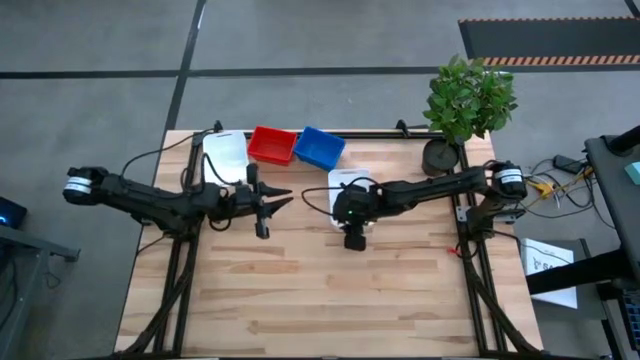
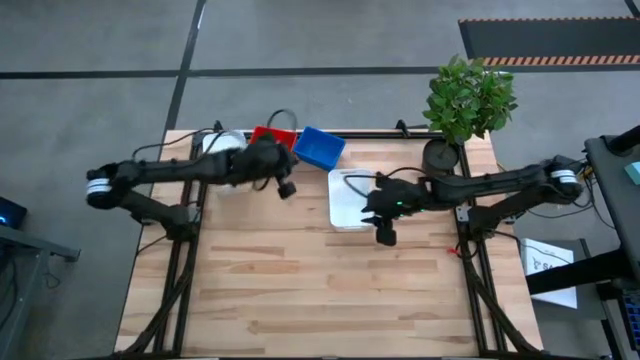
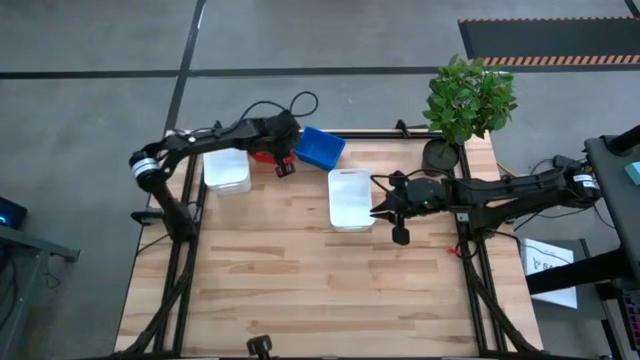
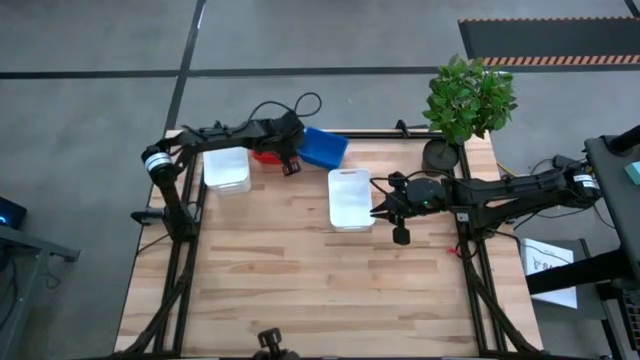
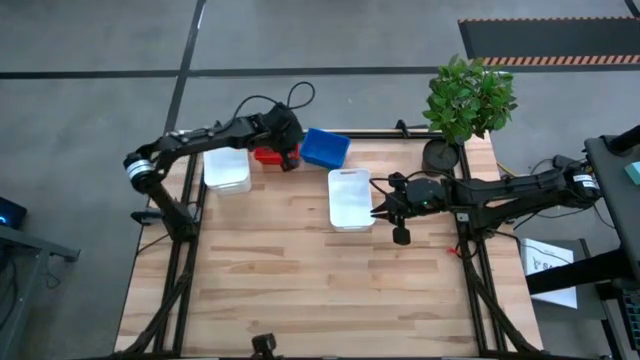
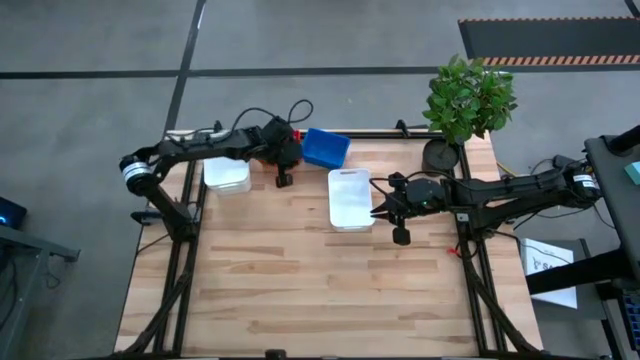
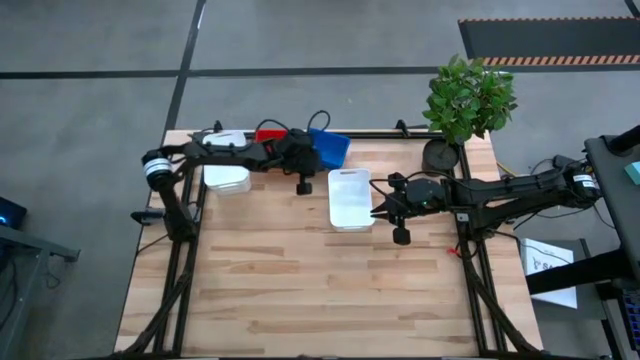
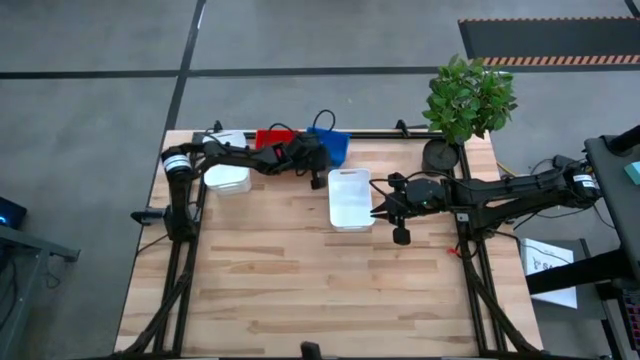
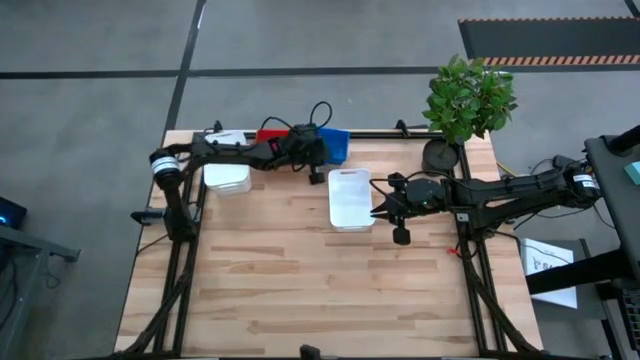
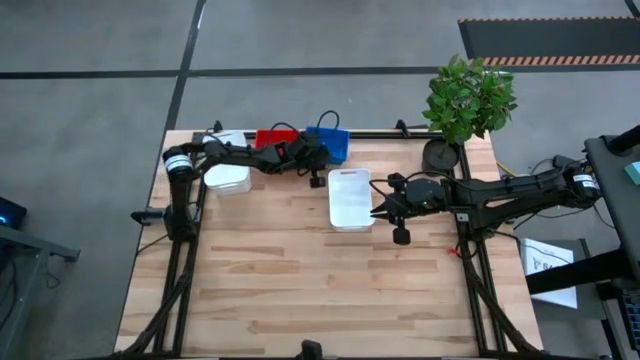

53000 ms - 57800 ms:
Adjust the stacked bins on the table

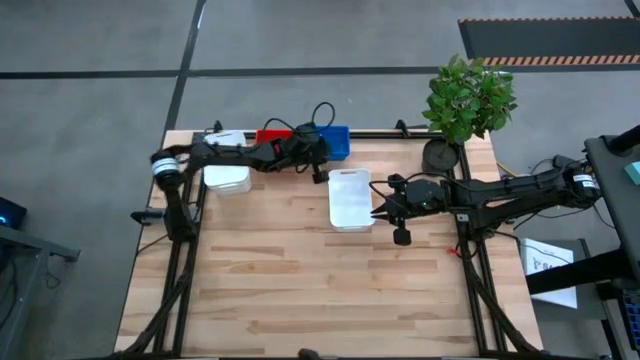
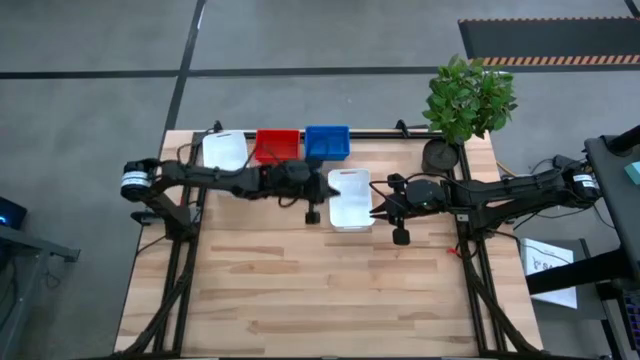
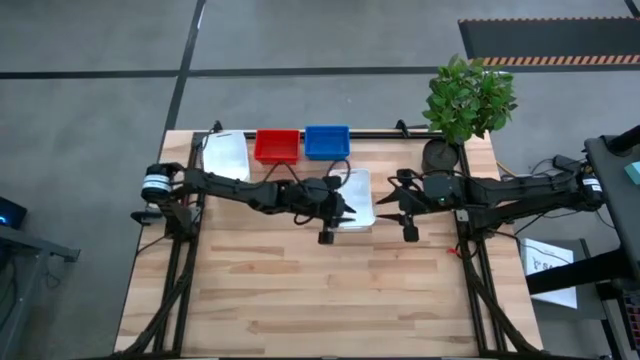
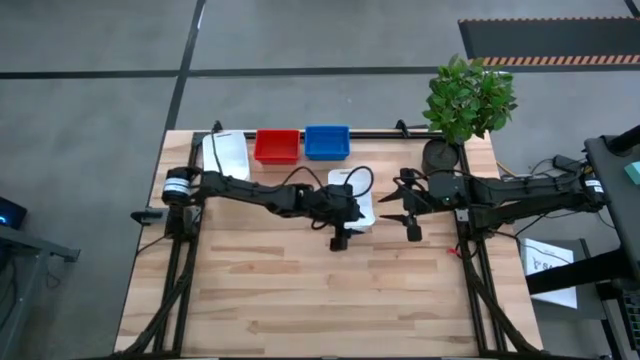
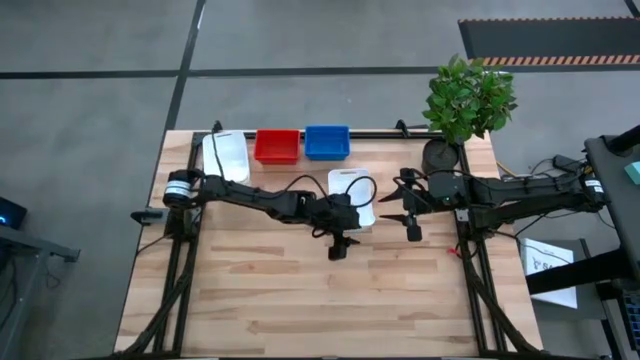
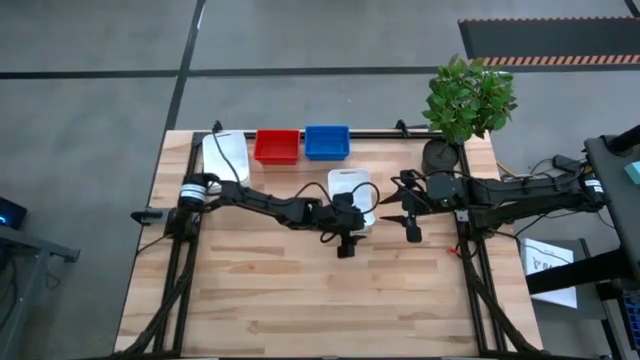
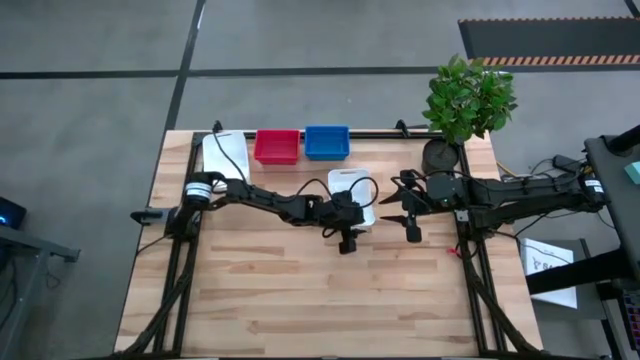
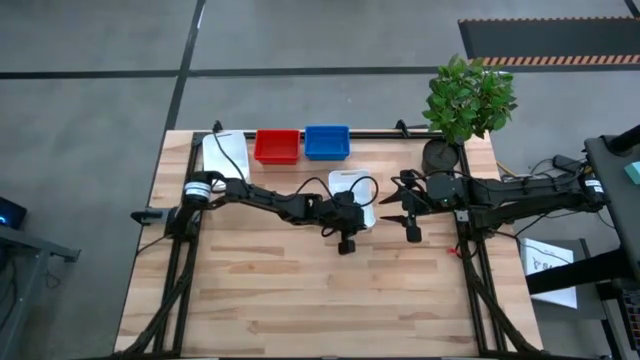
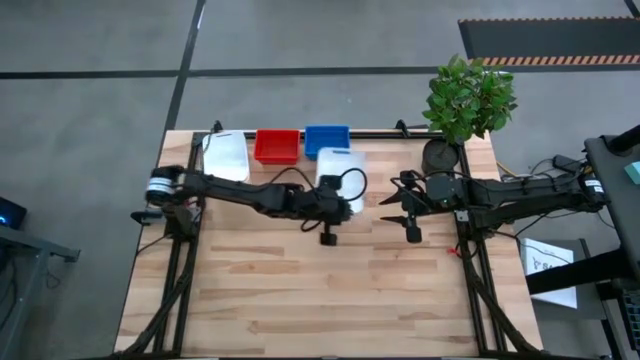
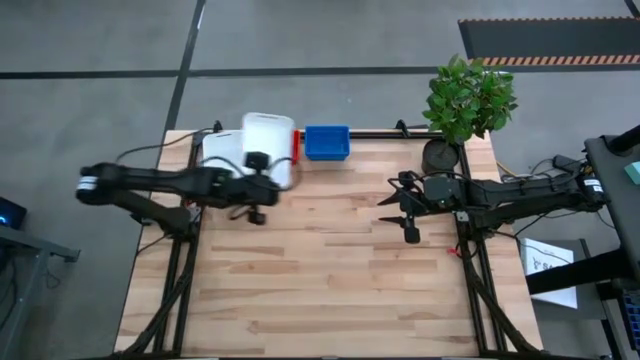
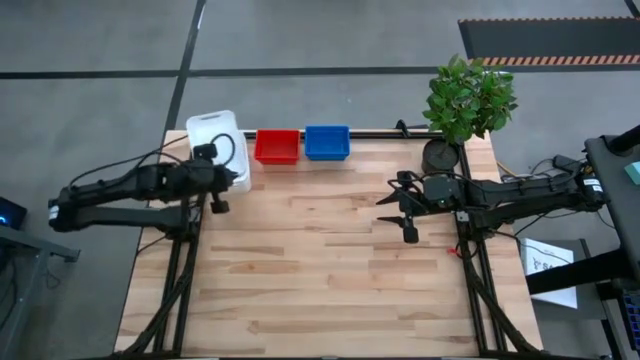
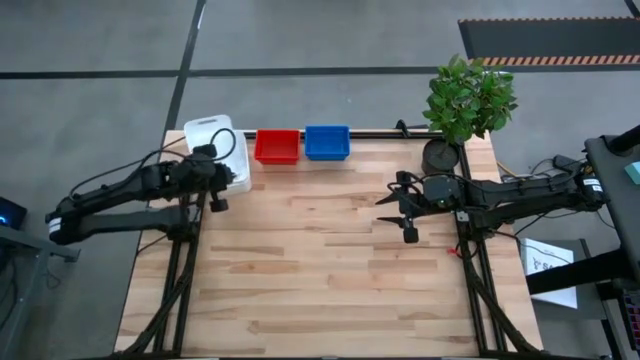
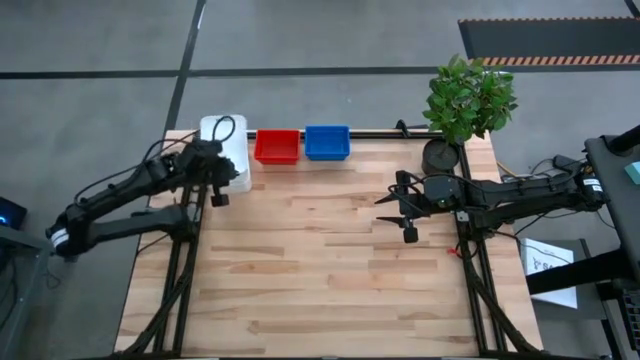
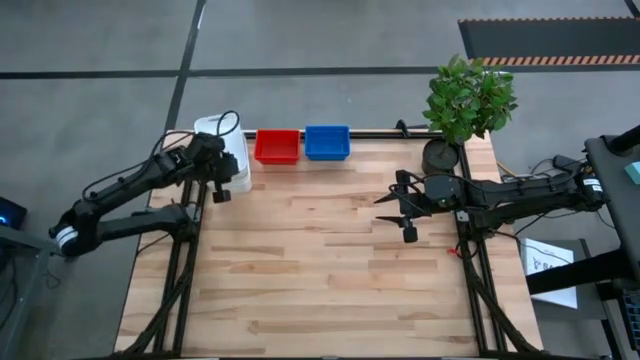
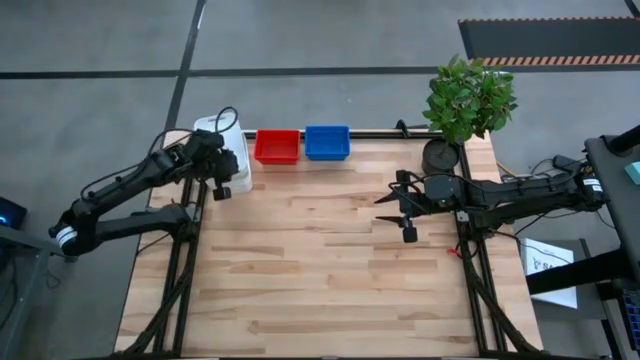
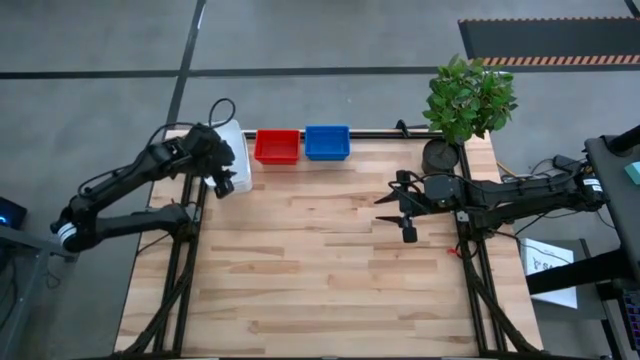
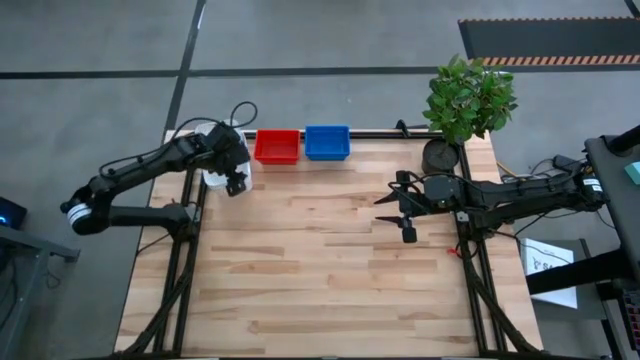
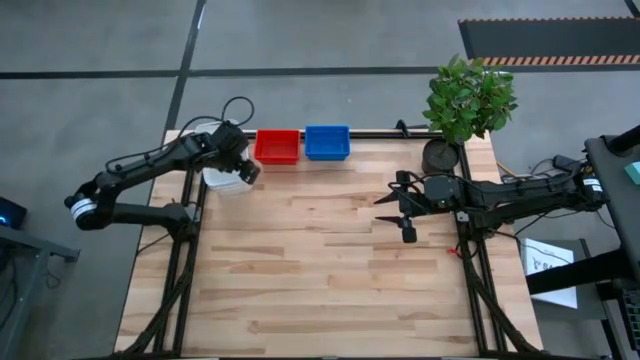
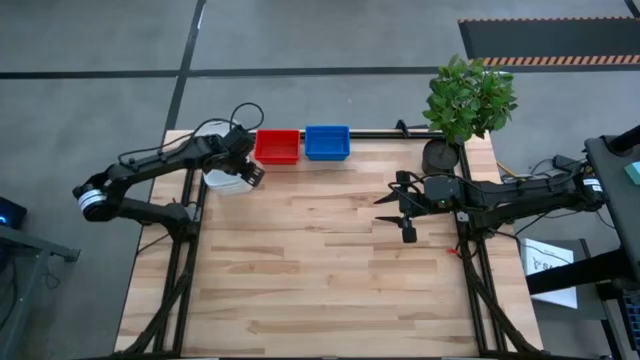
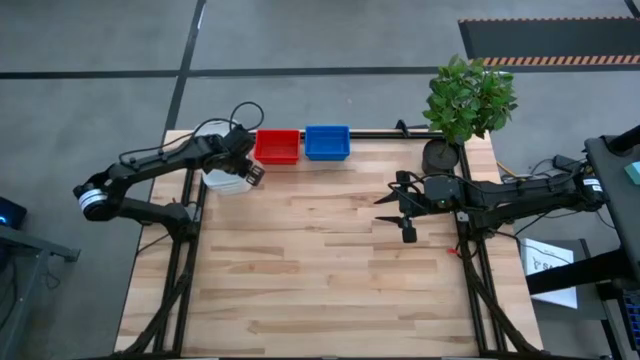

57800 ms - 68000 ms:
Stack the bottom white bin on the white bins

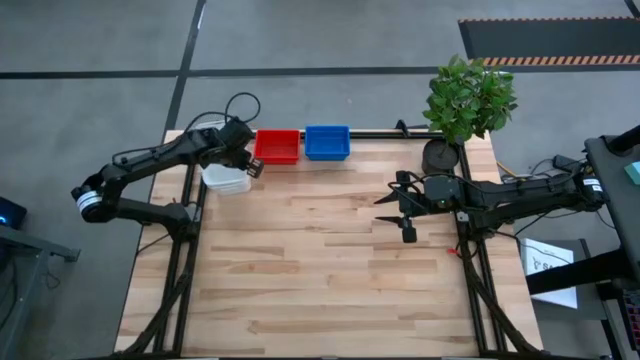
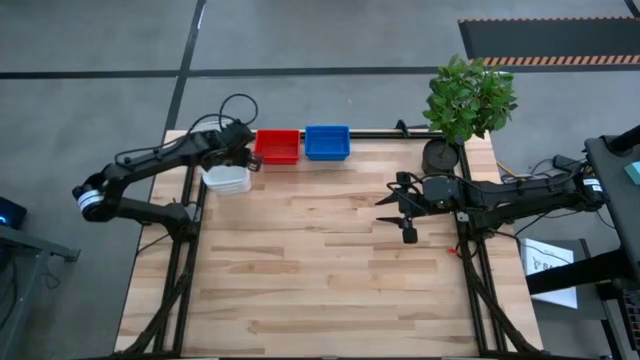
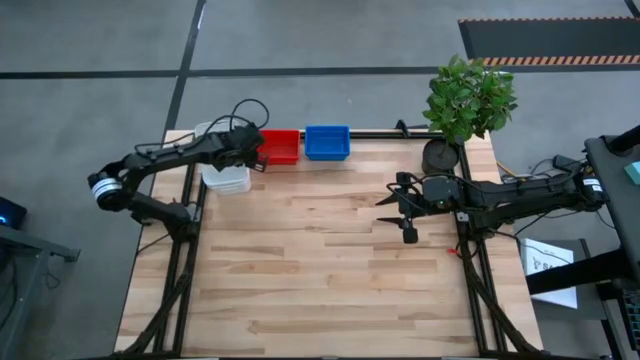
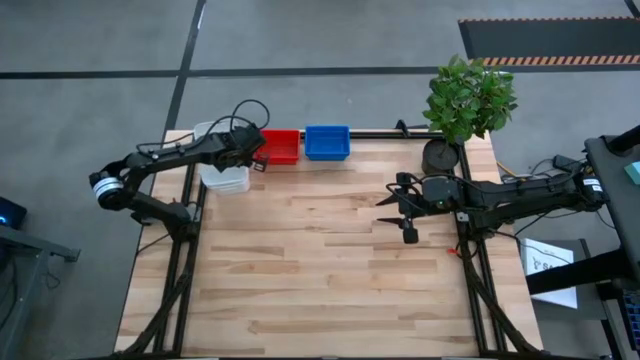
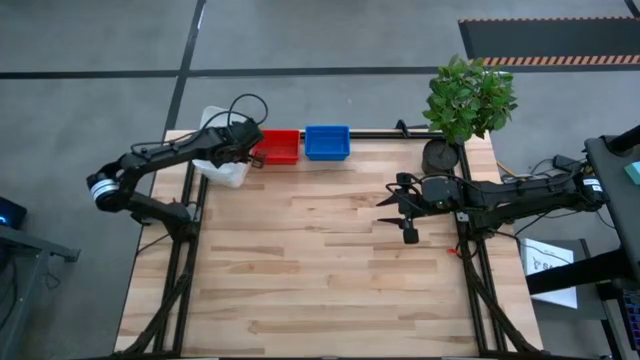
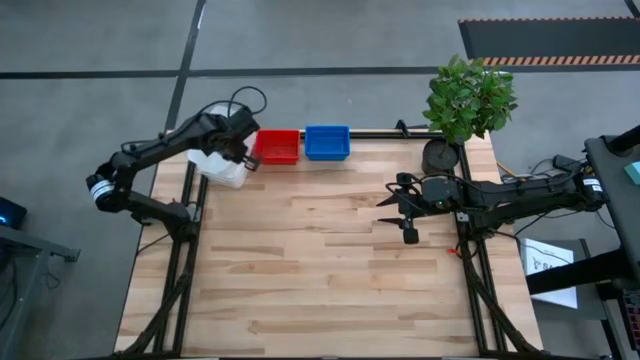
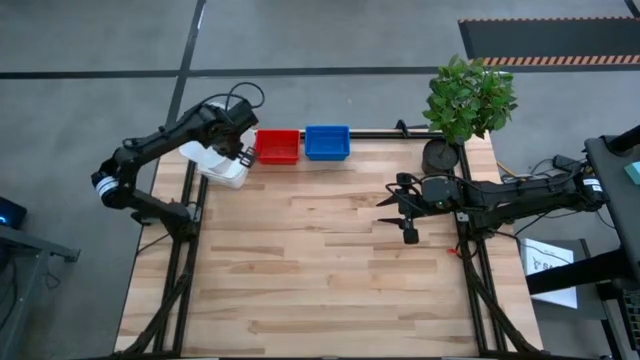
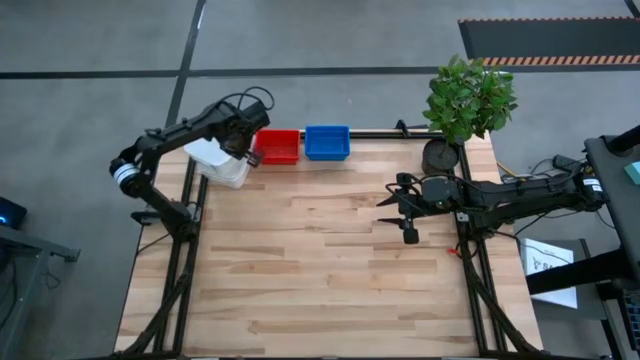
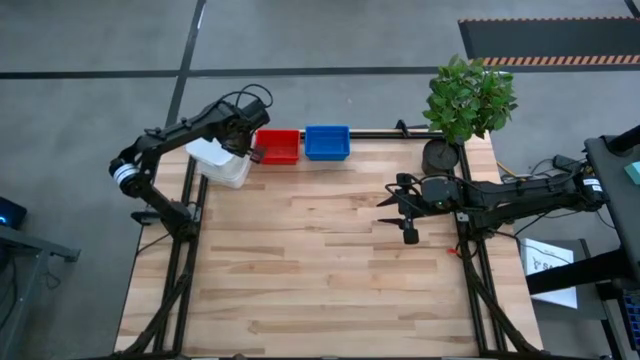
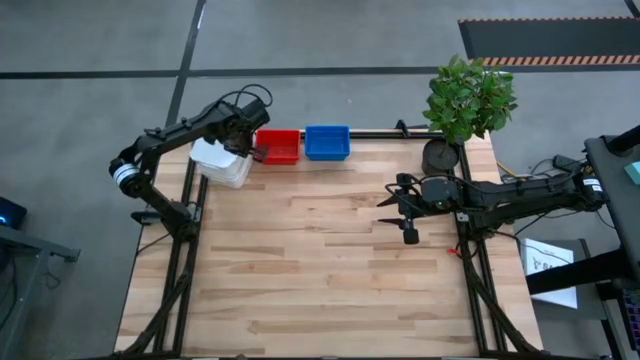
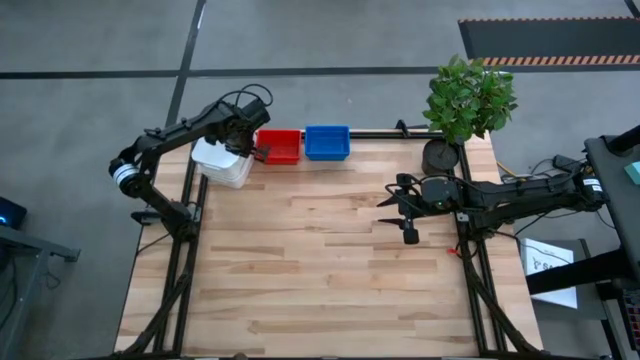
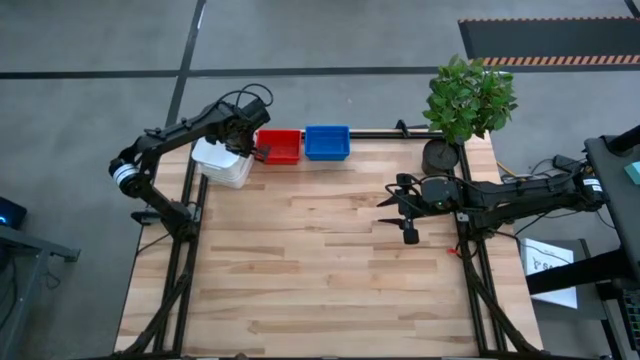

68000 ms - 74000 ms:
Stack the bottom white bin on the white bins
